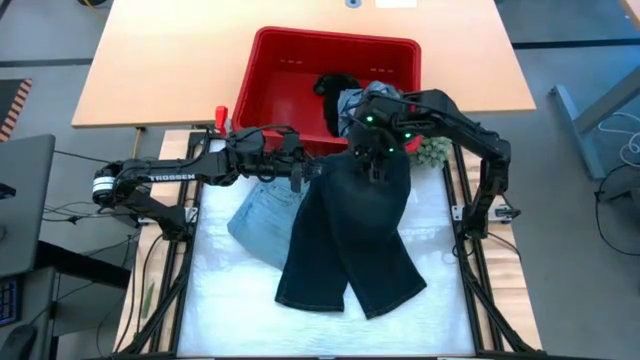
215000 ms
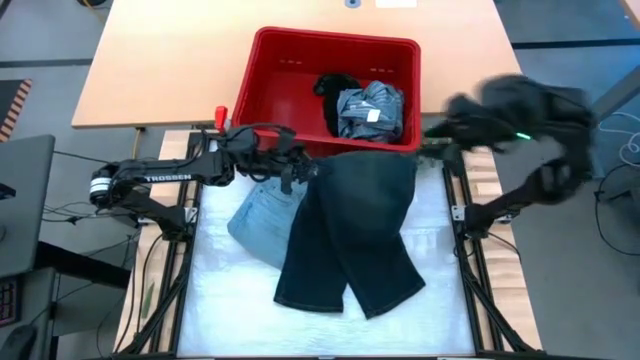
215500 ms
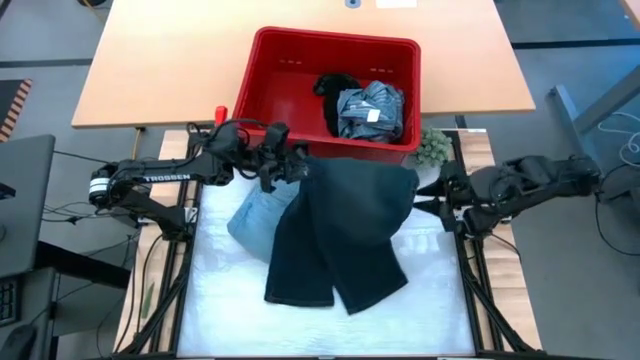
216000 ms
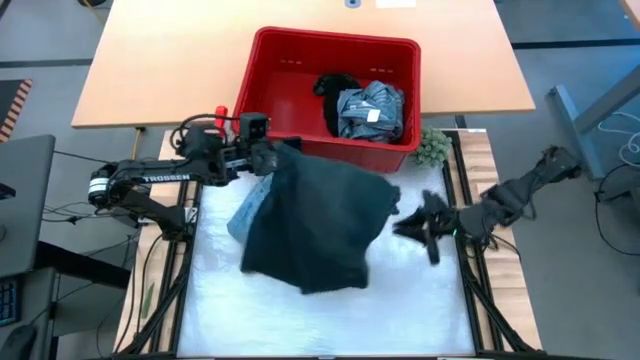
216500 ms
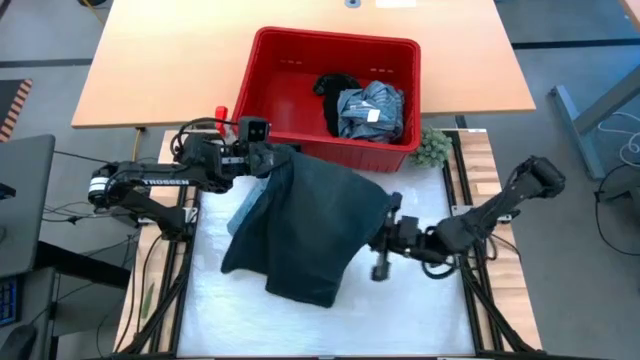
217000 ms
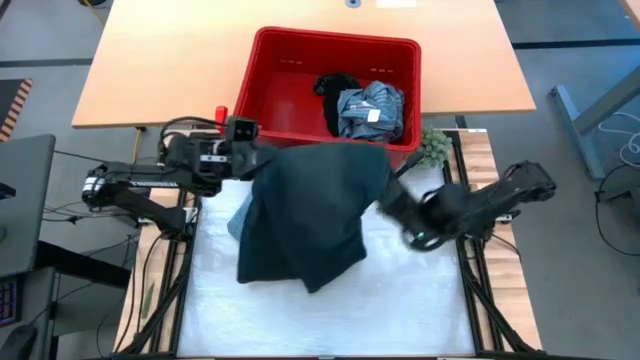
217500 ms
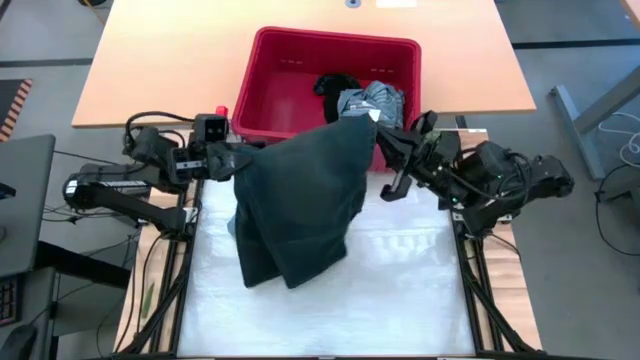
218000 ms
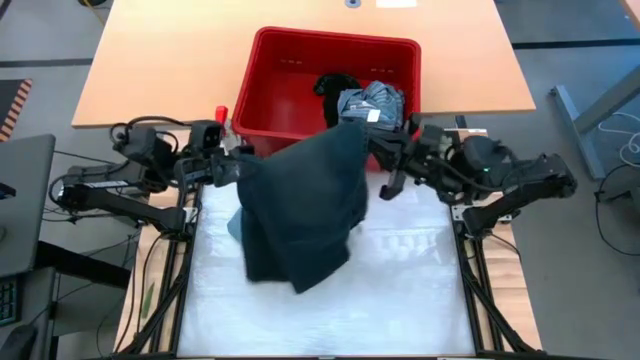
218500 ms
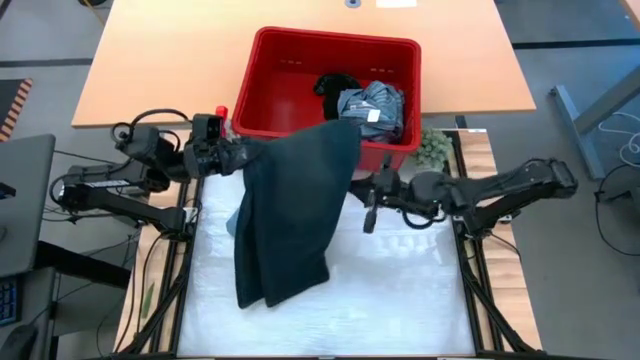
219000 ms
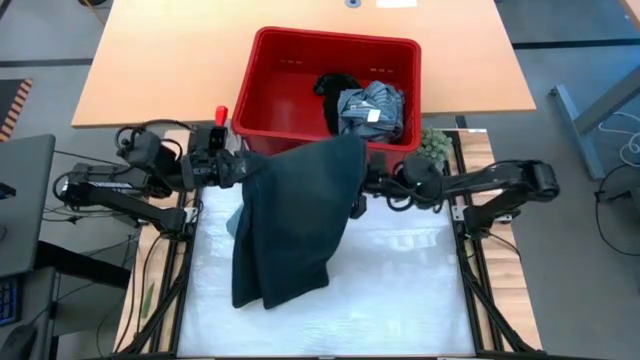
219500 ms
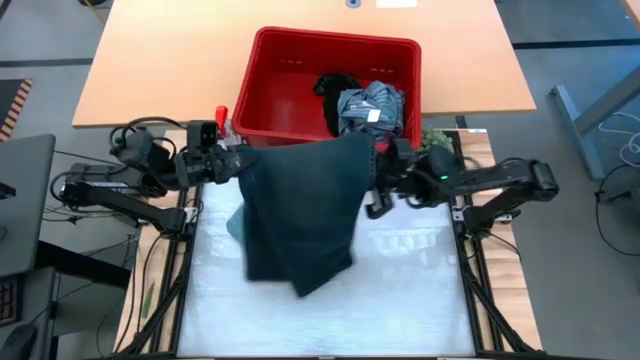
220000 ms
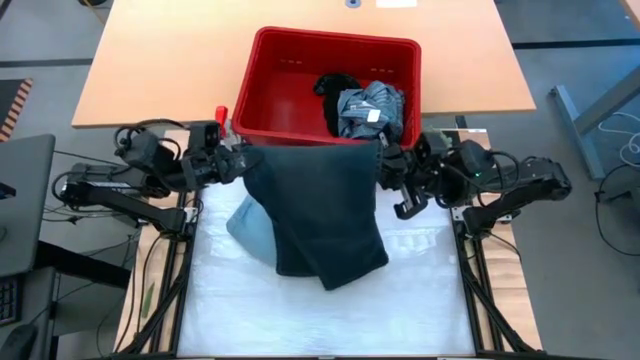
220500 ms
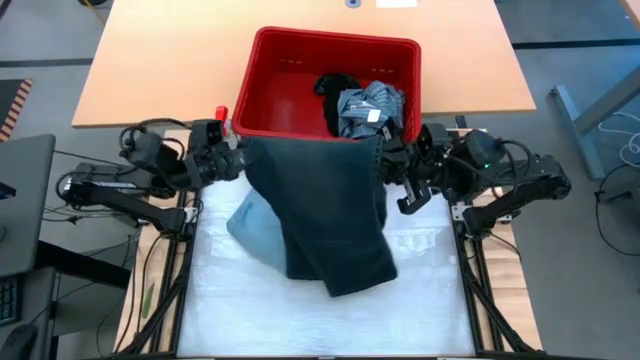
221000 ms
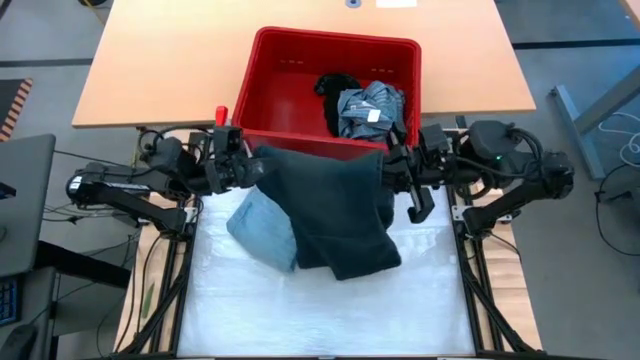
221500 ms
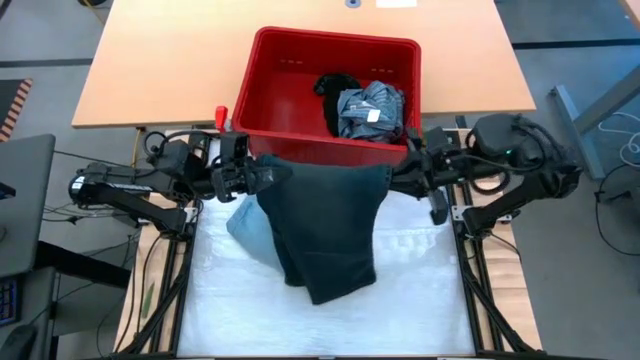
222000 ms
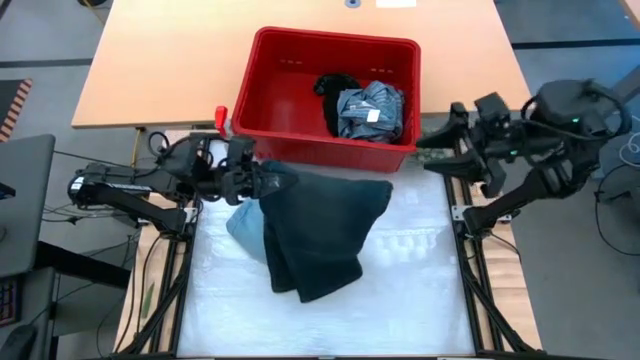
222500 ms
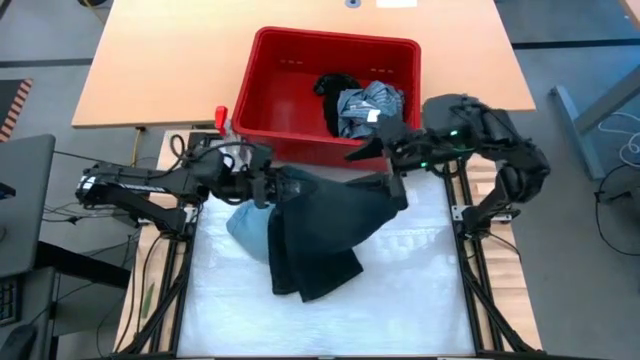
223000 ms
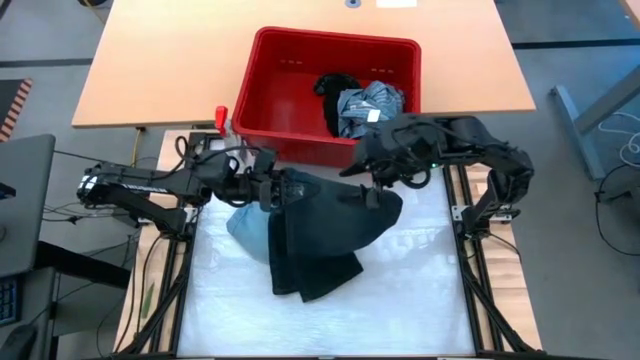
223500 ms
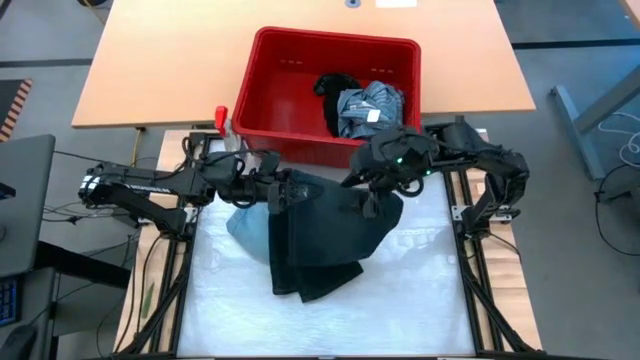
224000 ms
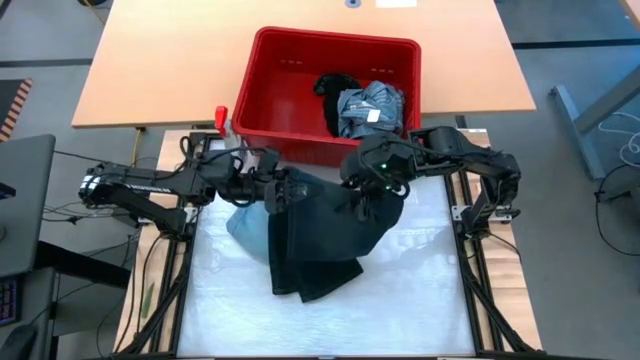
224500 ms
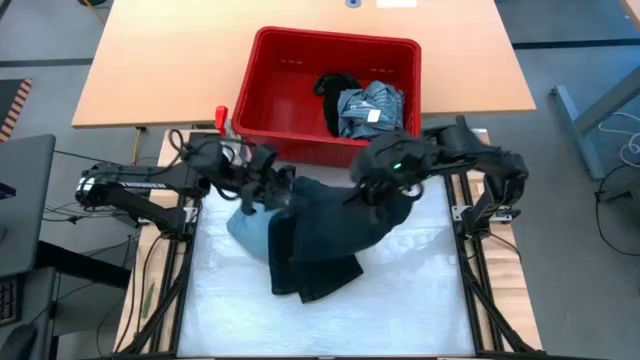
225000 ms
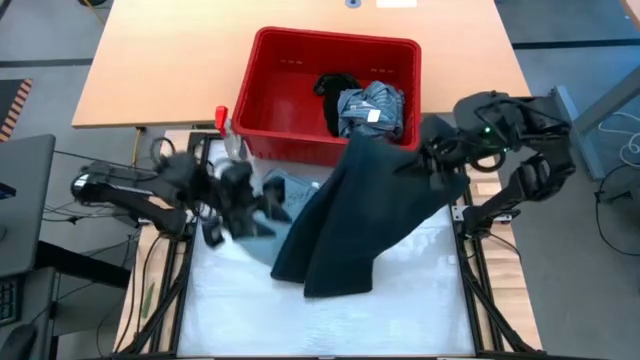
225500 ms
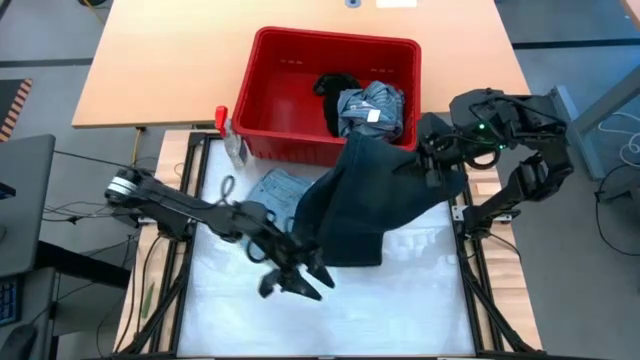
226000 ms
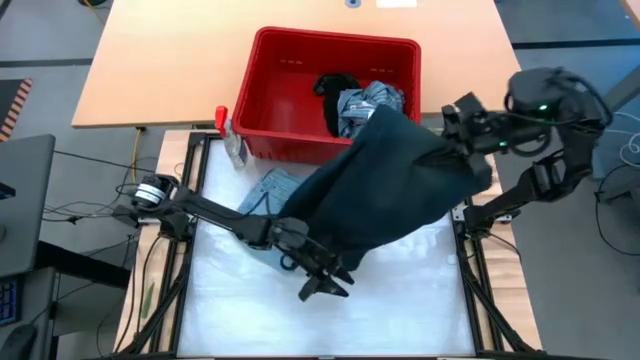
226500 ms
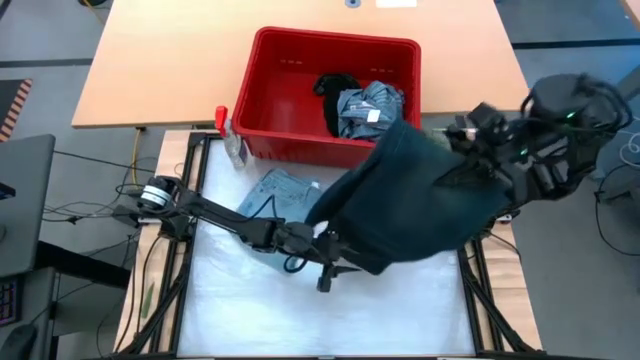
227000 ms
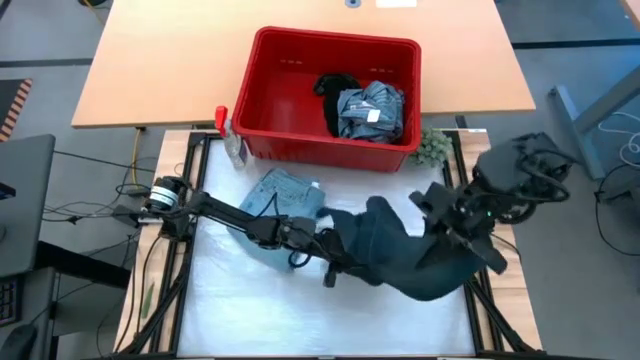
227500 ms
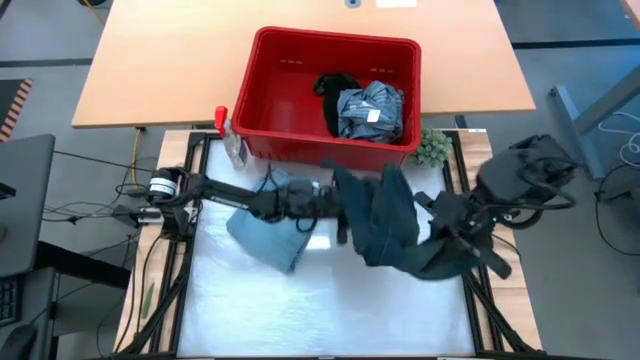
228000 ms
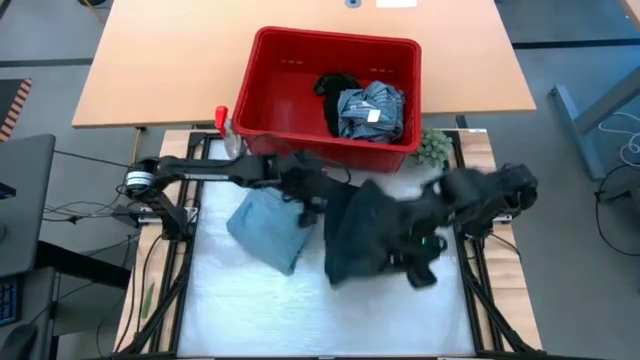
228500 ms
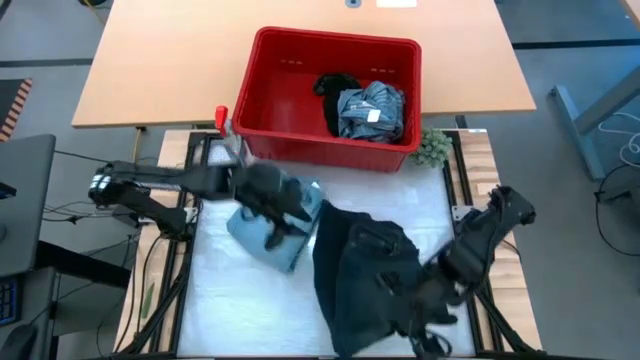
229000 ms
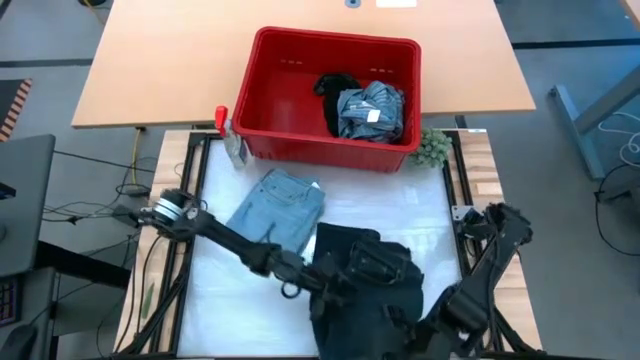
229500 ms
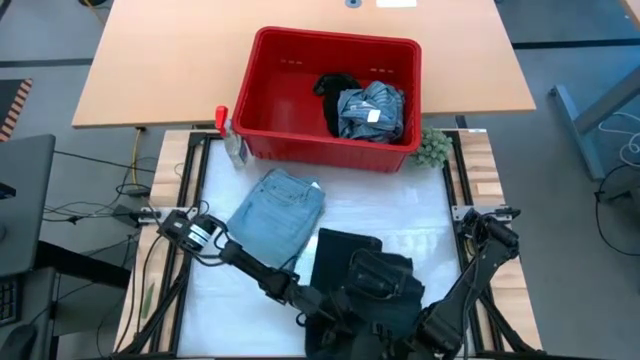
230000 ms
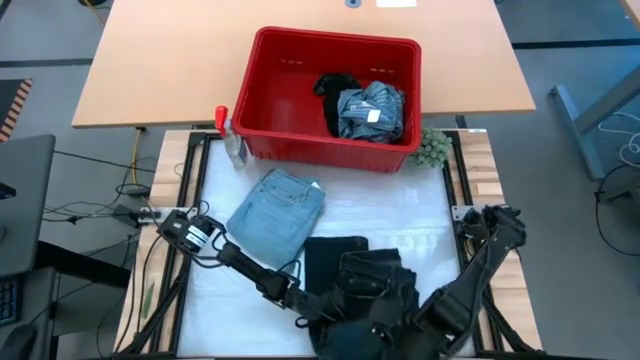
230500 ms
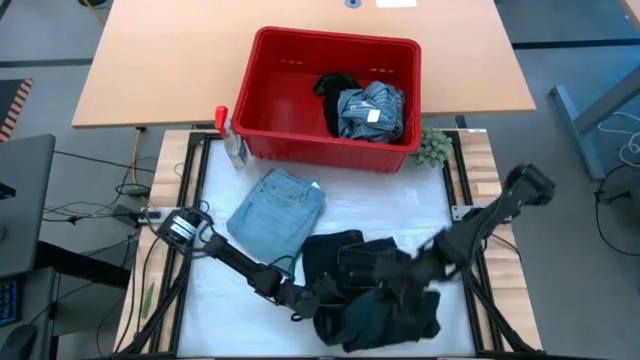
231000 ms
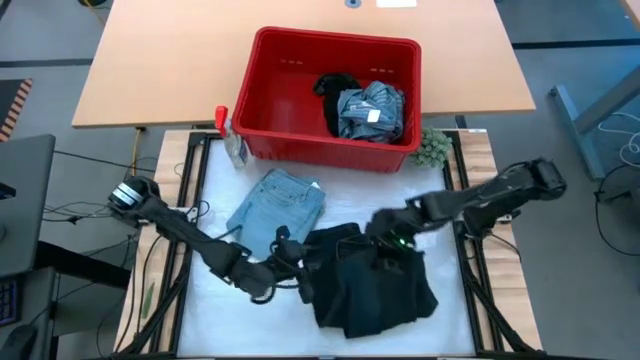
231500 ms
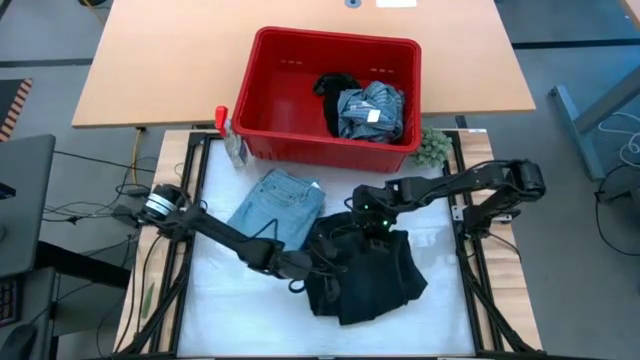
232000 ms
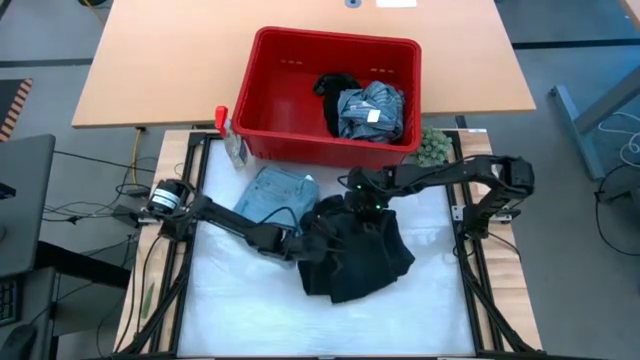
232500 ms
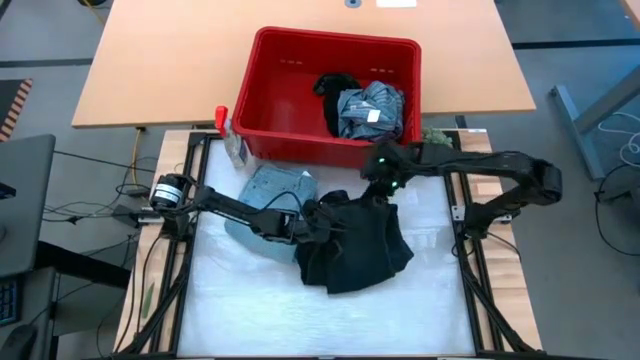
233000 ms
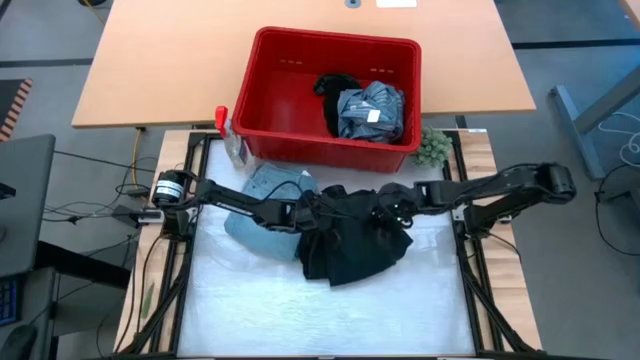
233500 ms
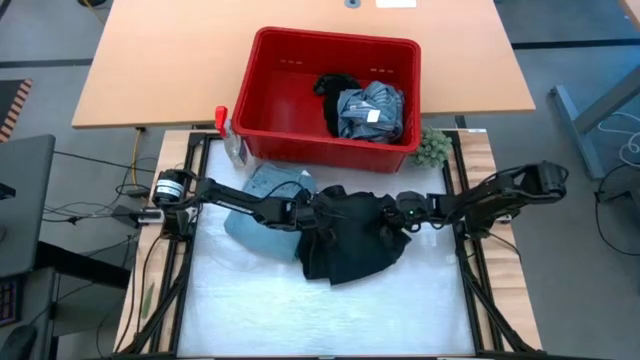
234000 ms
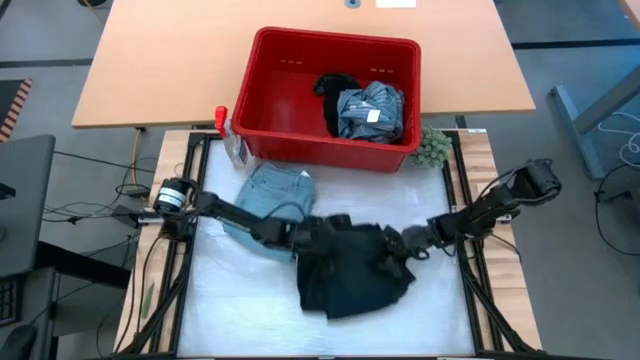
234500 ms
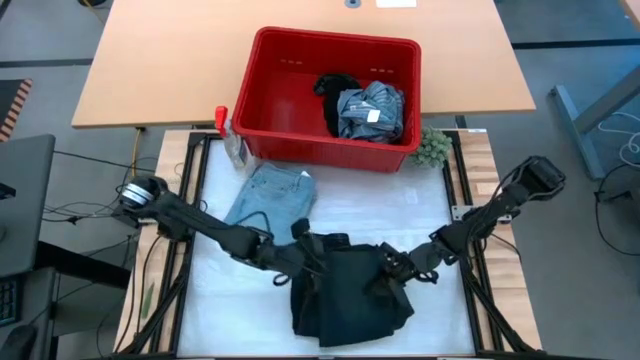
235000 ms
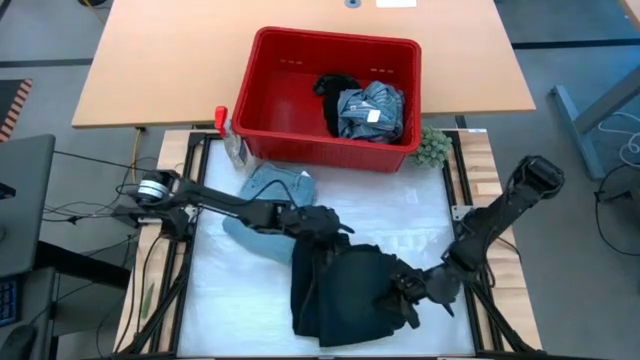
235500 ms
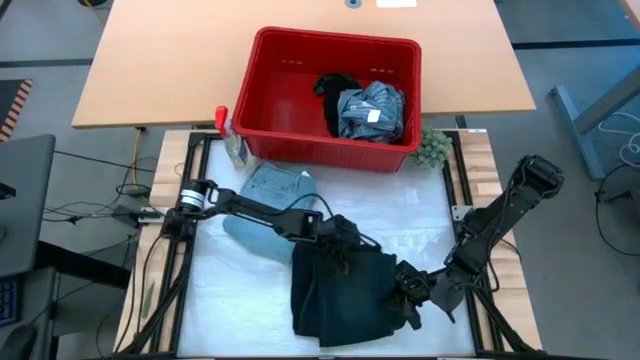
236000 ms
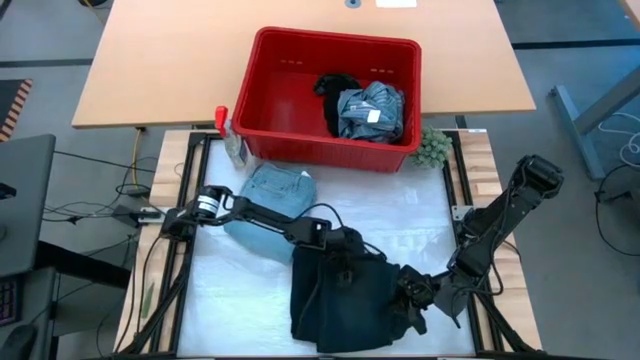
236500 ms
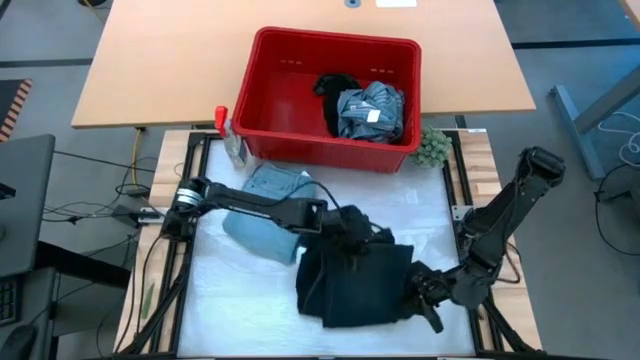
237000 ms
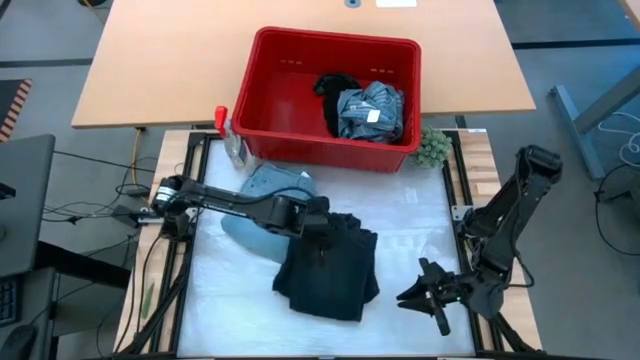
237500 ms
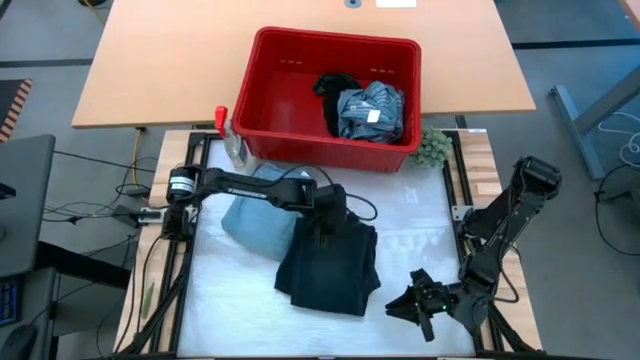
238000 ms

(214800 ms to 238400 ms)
Task: Fold laundry
Fold the black pants from the red laundry bin
